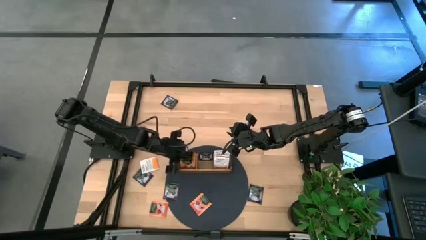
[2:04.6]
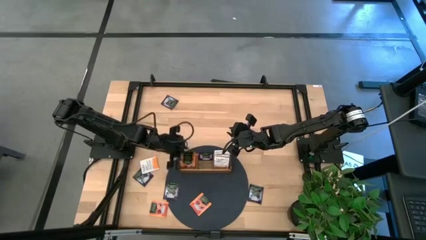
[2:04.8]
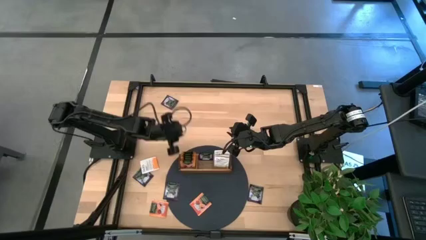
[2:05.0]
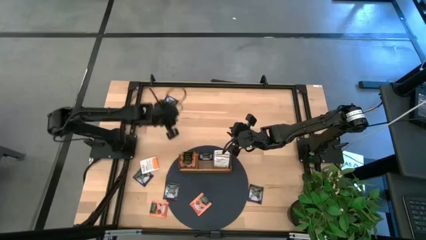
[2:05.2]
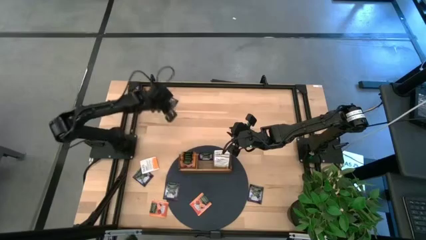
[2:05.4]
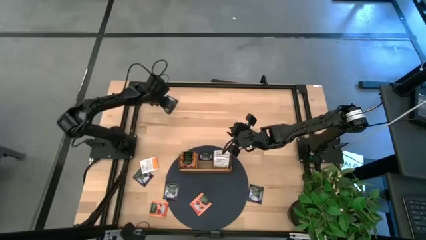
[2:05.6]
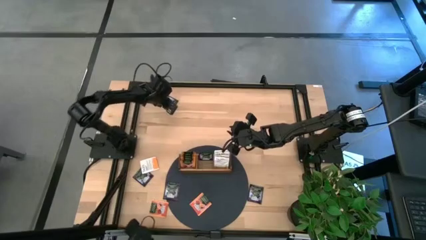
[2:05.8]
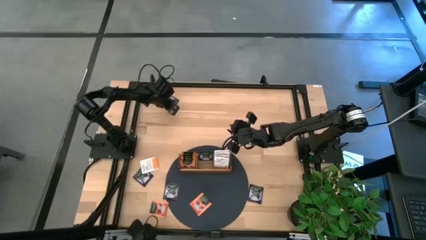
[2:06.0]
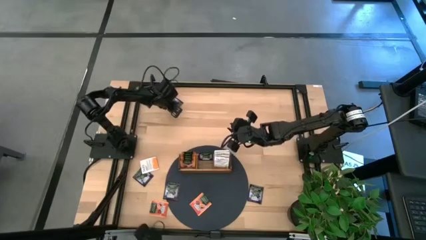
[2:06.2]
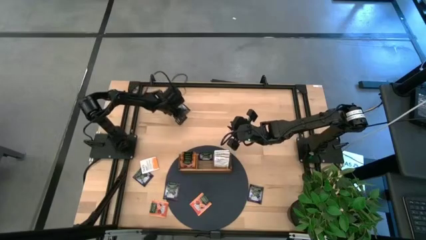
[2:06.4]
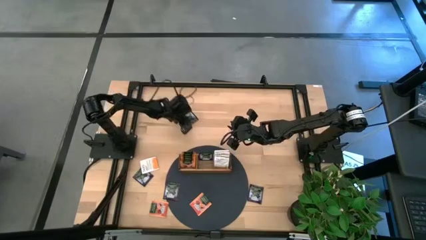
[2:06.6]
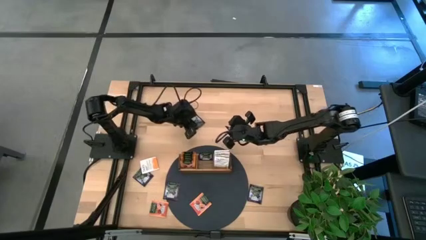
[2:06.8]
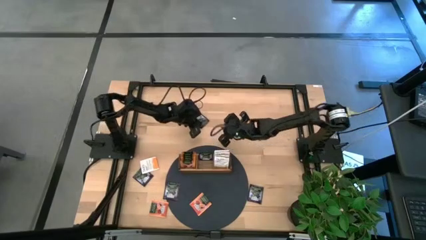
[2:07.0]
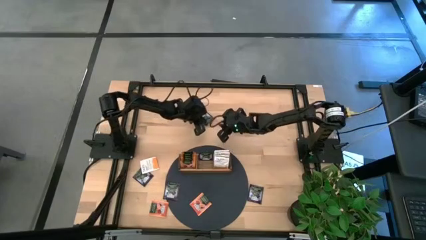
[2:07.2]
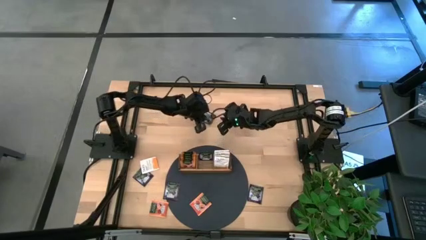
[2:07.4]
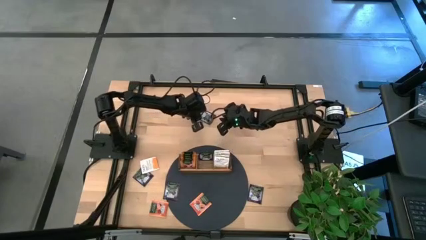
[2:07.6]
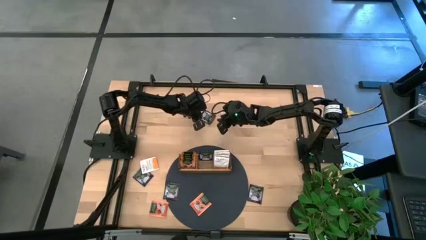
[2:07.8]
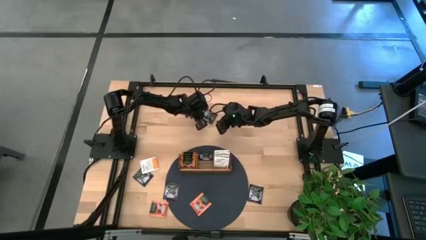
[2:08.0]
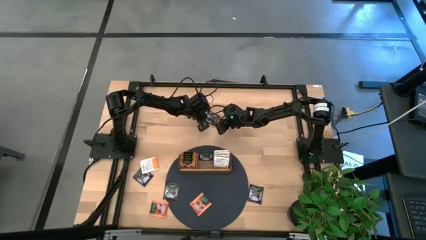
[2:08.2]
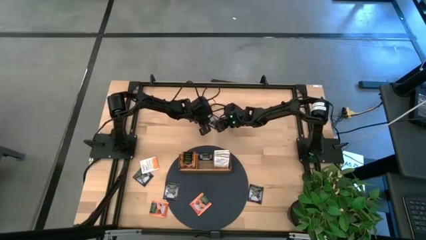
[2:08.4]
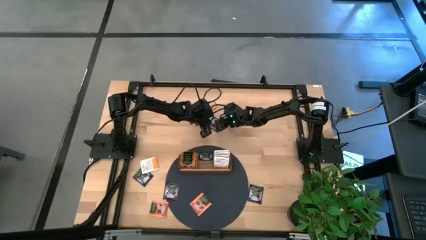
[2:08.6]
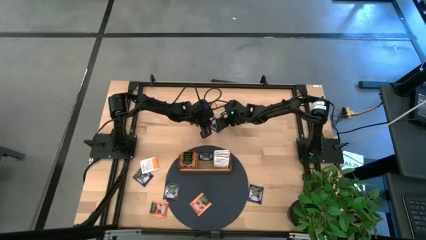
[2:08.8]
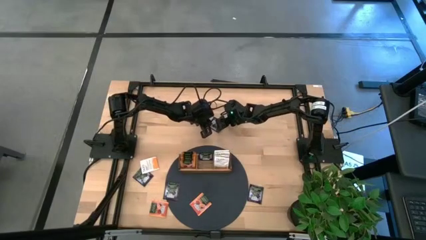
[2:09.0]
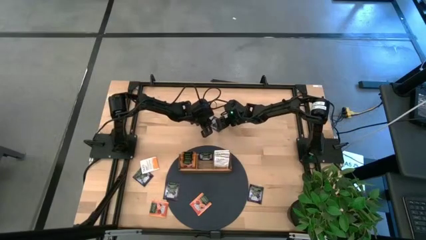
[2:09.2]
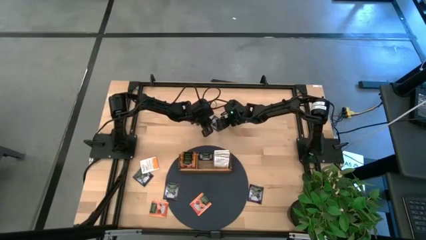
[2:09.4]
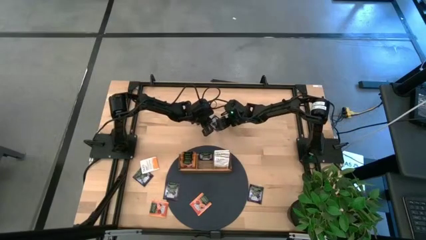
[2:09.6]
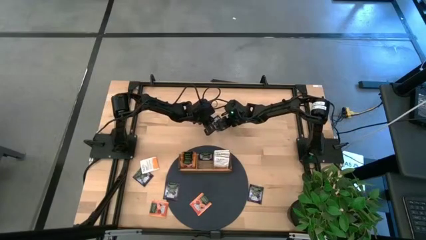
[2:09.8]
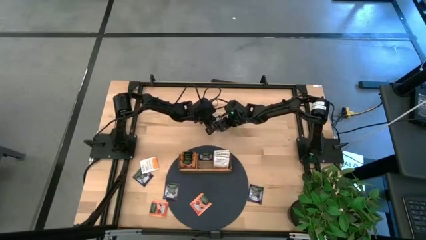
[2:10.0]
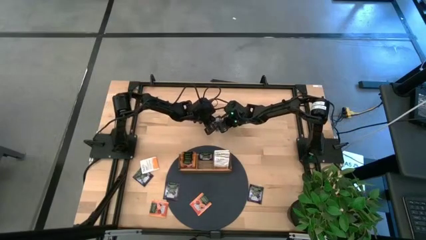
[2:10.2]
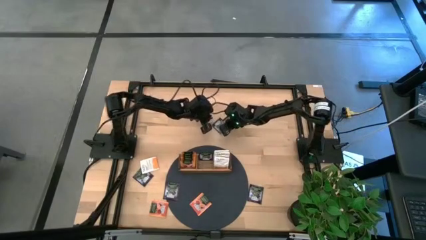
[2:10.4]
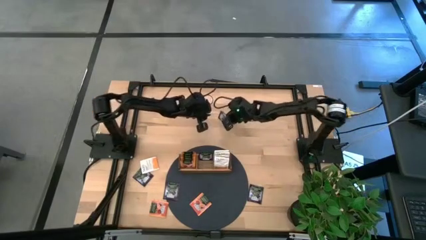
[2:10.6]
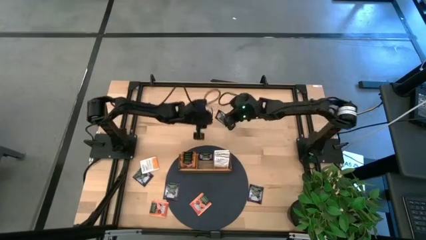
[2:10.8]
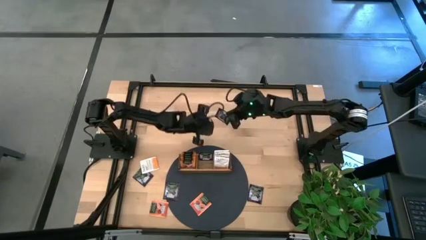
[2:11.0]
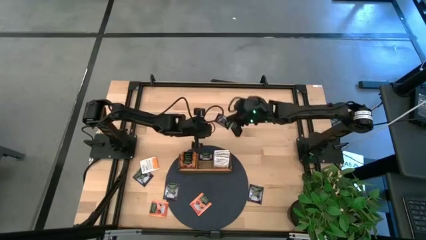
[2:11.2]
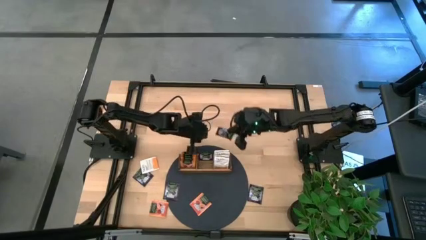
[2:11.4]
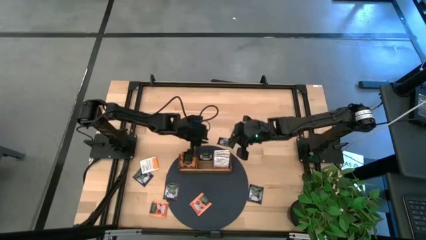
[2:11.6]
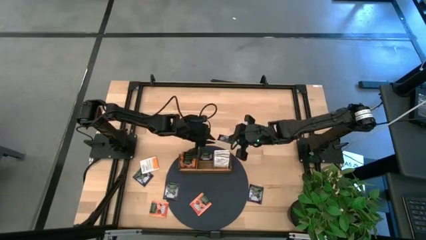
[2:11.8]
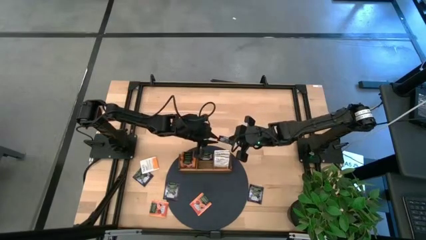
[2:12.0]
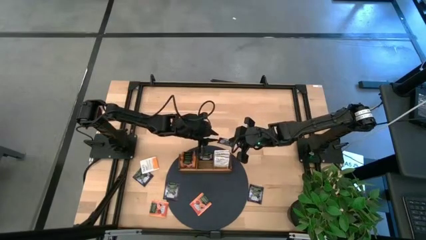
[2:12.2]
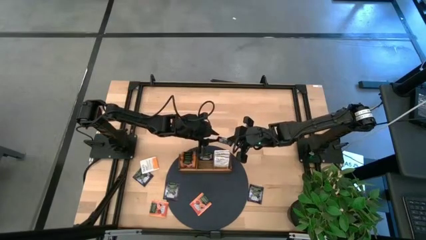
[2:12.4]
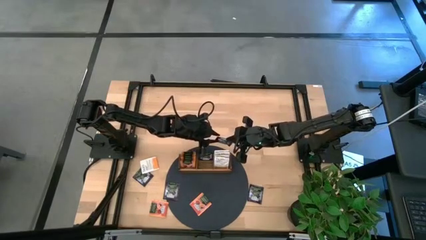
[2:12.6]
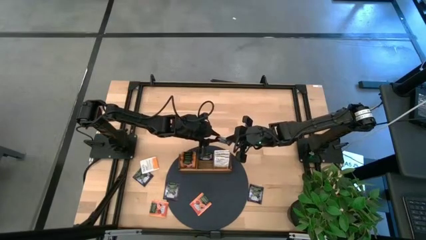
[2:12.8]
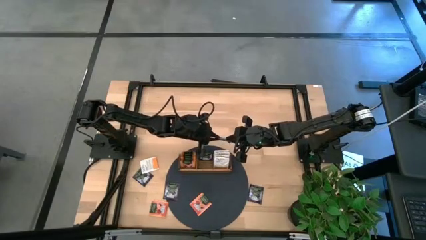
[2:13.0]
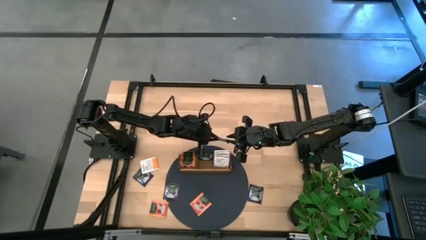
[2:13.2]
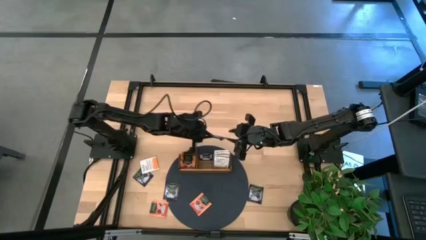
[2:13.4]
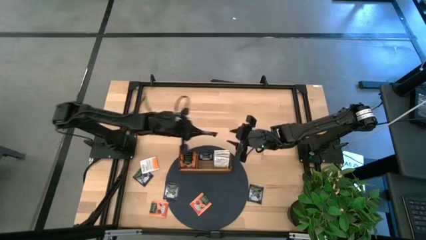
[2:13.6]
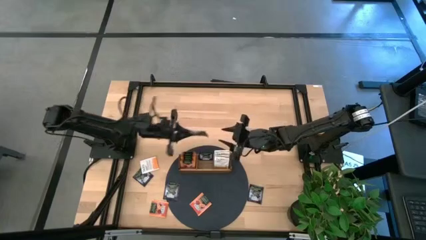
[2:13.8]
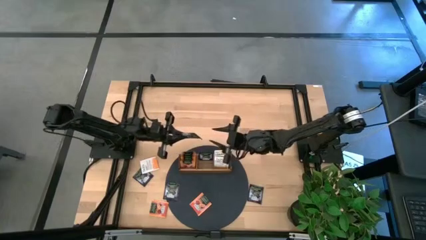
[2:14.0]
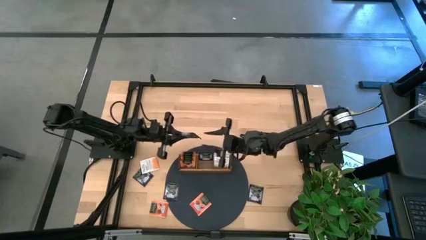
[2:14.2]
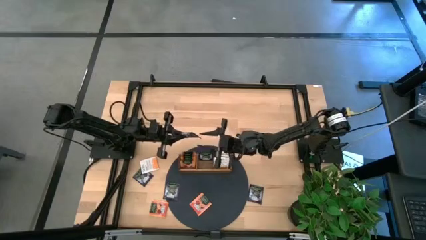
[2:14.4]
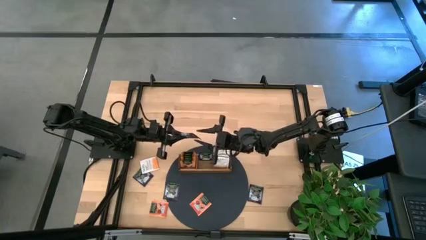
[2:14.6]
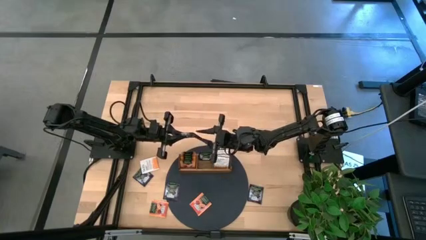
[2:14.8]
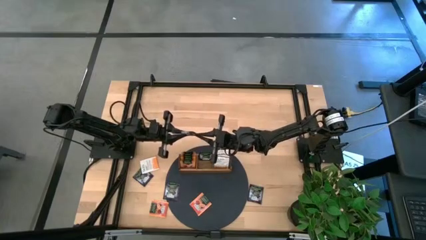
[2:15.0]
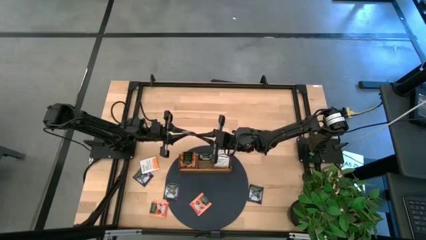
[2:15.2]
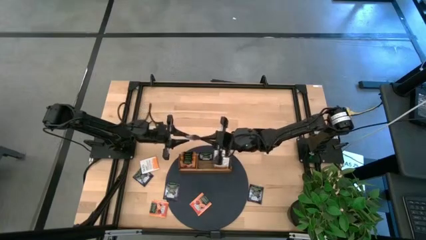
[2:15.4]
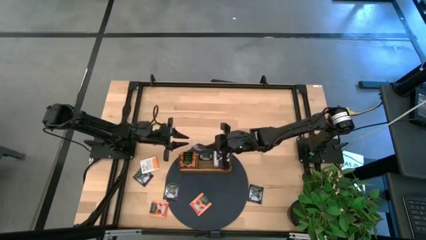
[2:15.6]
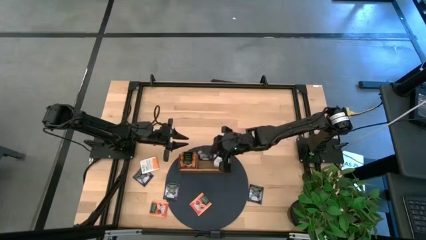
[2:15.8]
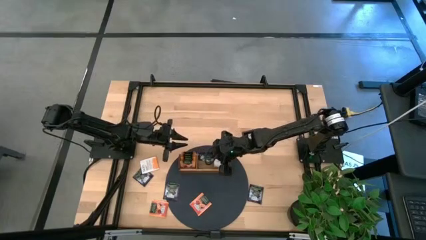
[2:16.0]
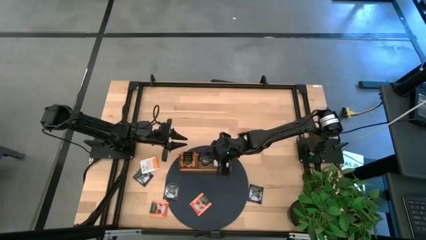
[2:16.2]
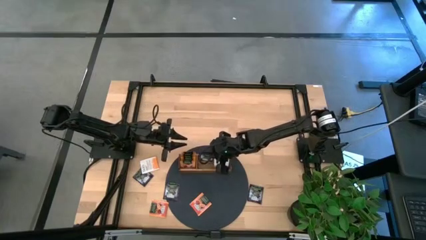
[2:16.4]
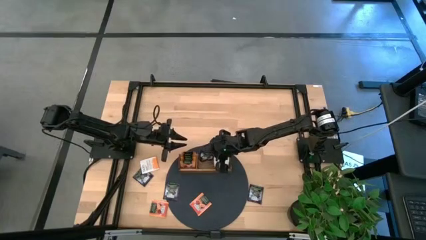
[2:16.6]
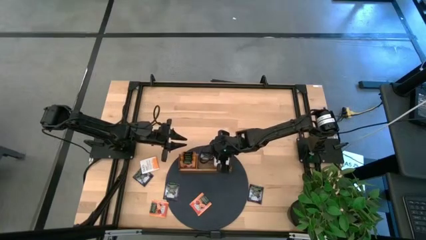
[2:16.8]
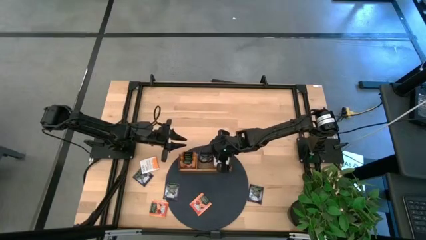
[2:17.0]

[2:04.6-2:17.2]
Task: Pick & Place Tea
Put the black tea bag into the middle section of the wooden organizer

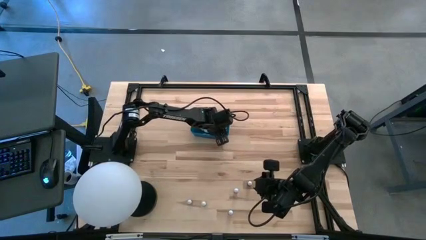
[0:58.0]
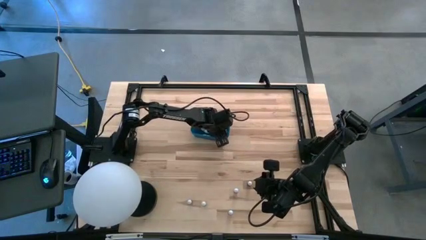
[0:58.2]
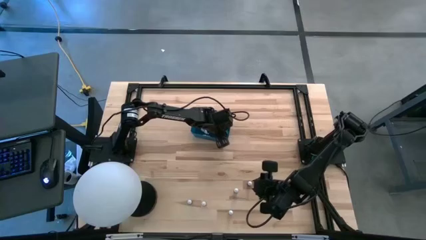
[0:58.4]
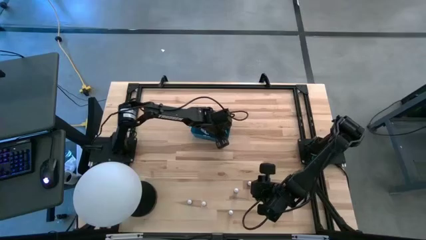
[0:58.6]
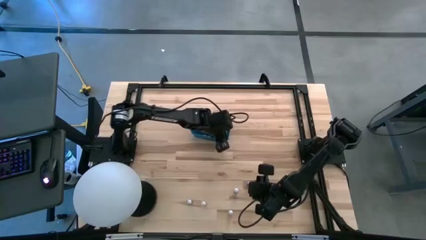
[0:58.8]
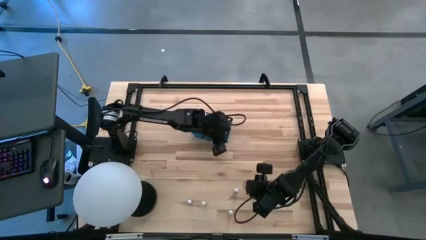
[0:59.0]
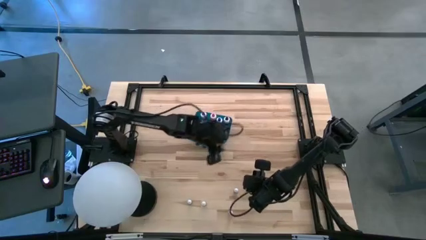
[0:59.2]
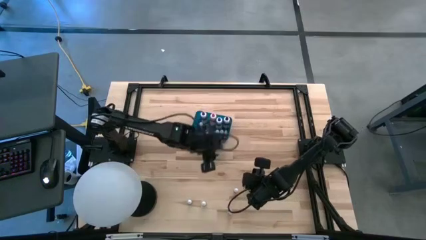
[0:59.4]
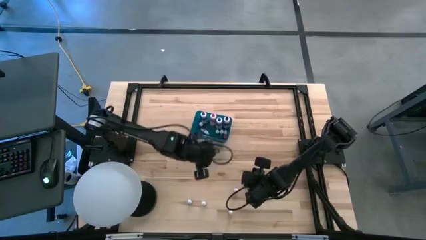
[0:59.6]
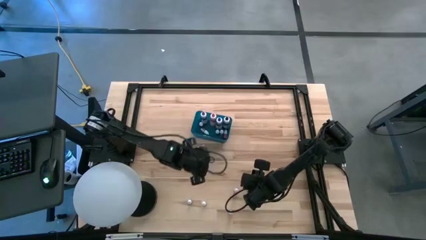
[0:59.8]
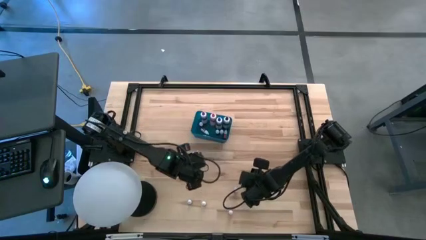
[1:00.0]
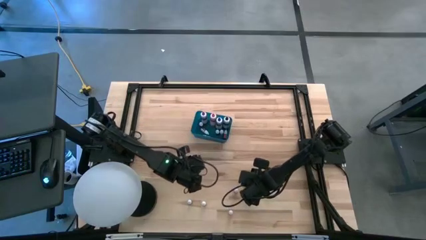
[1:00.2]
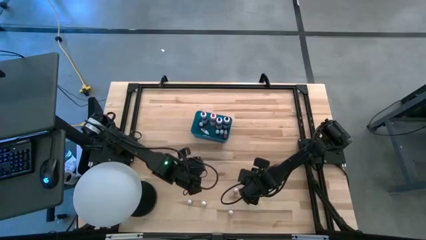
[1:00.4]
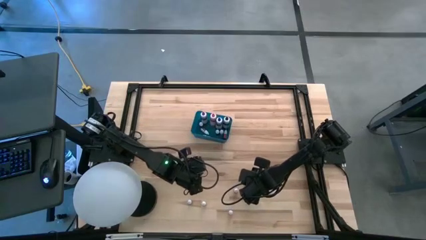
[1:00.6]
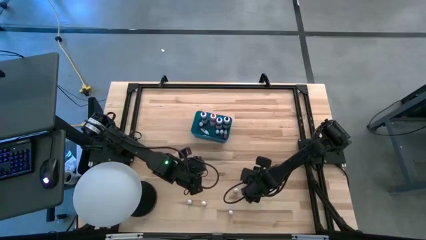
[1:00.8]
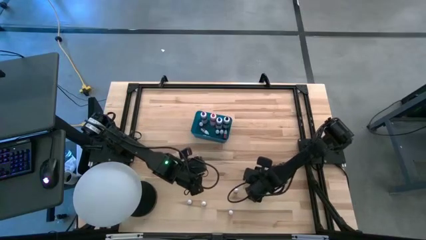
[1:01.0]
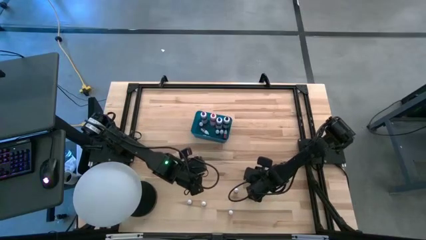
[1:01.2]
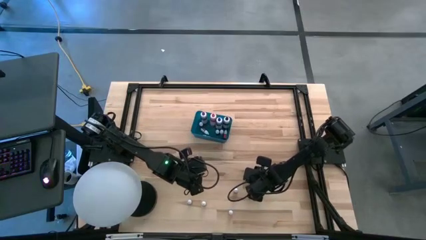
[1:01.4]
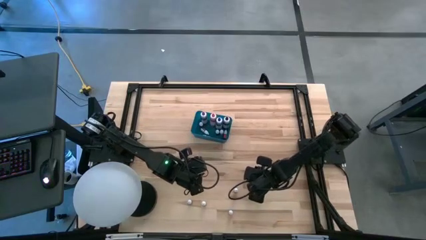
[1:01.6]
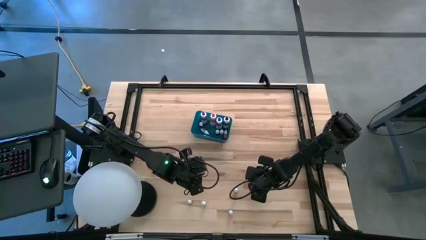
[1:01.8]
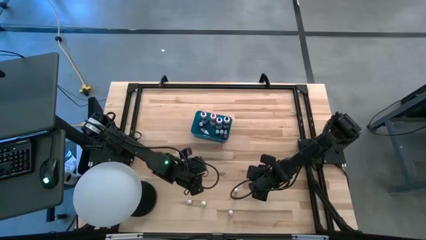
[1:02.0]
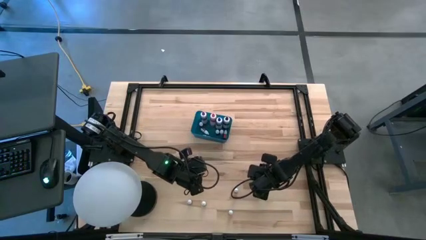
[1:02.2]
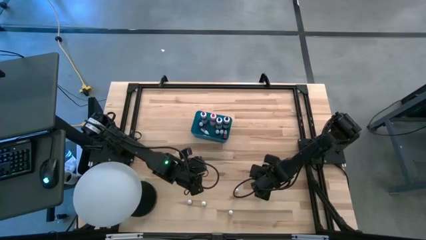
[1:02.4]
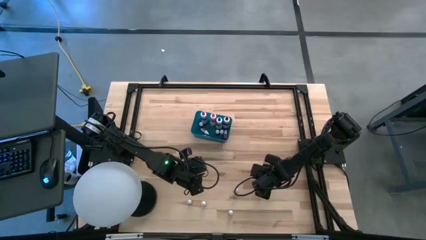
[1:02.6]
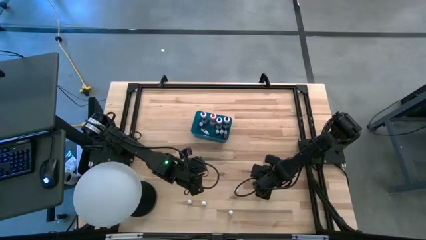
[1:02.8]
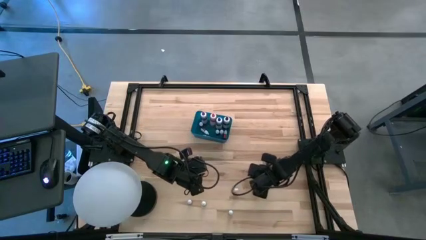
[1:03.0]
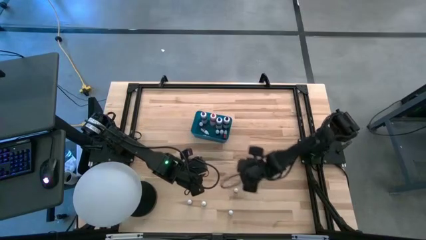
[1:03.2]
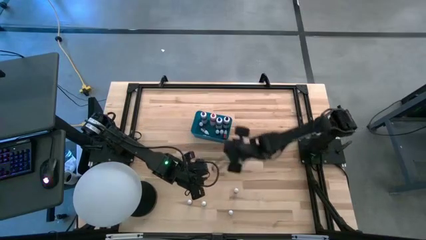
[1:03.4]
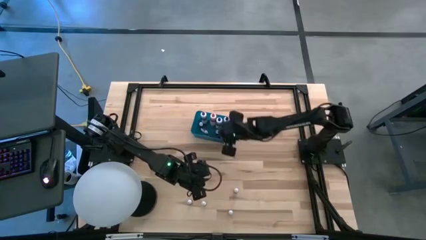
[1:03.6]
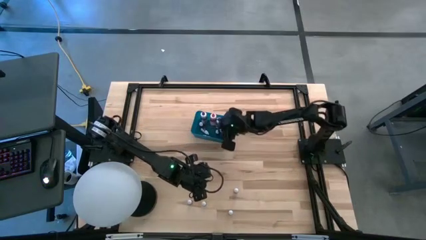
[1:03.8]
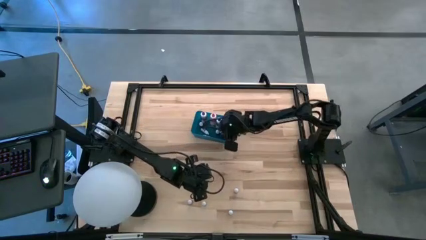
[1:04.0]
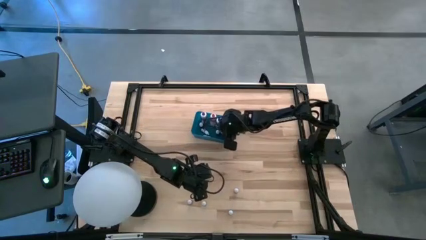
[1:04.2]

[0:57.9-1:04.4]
Task: Pick & Place food coloring
Put the blue food coloring bottle into the blue bin
